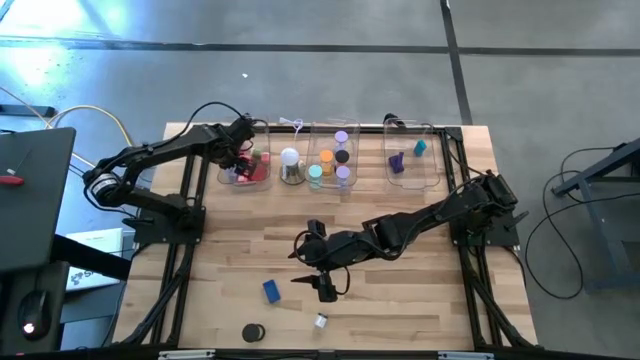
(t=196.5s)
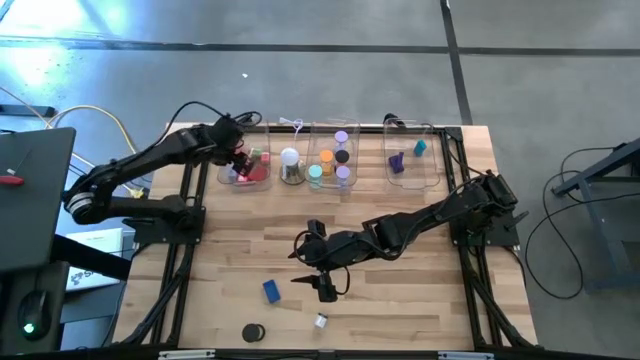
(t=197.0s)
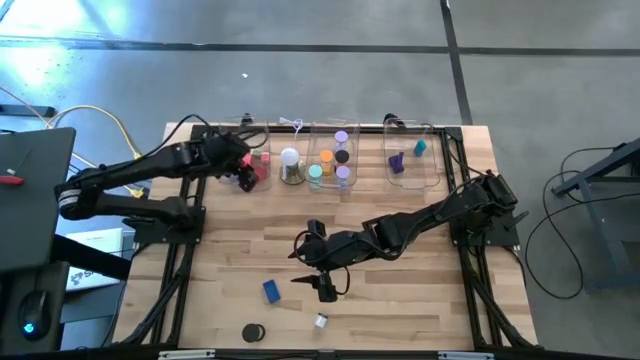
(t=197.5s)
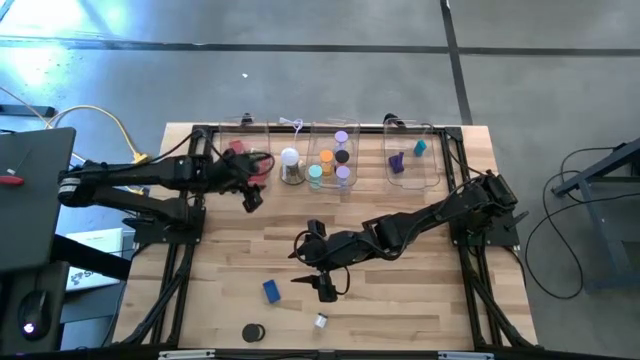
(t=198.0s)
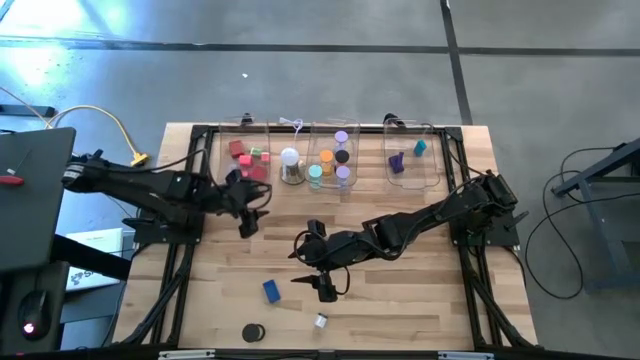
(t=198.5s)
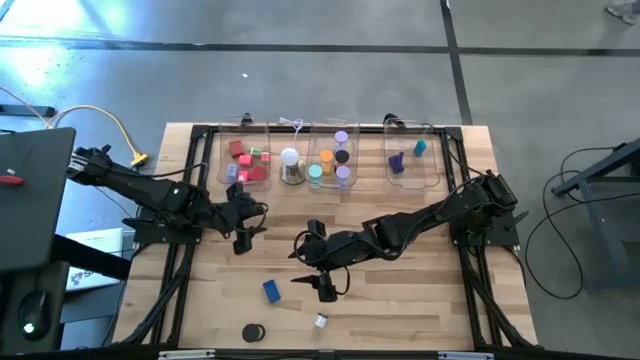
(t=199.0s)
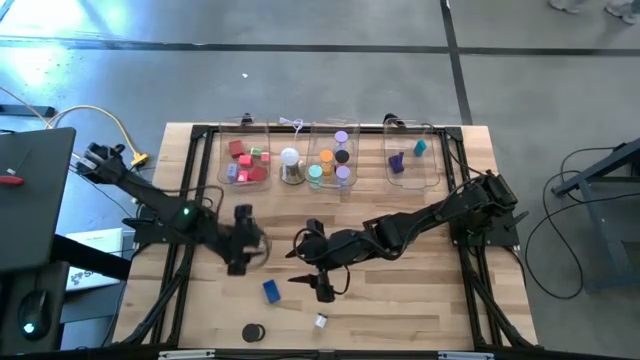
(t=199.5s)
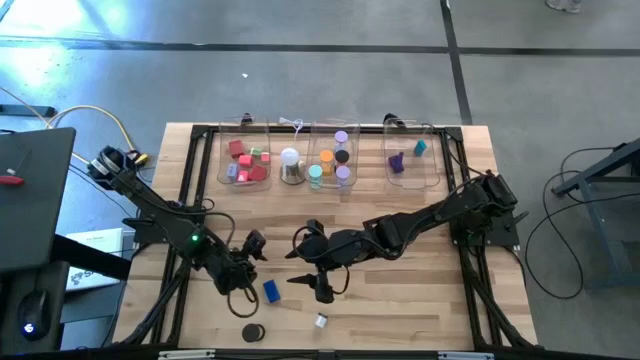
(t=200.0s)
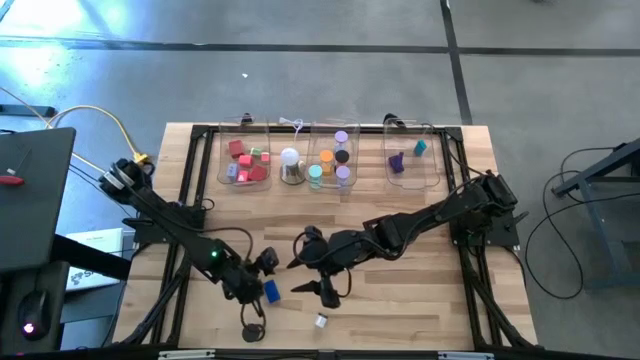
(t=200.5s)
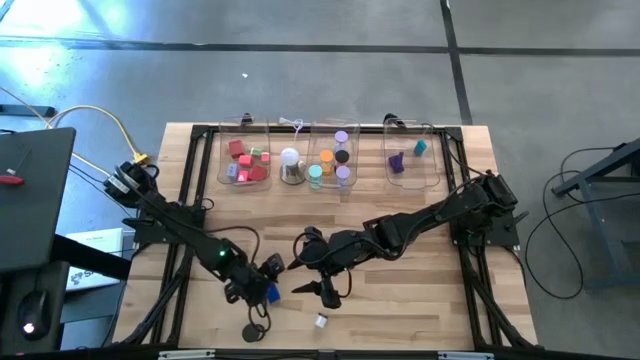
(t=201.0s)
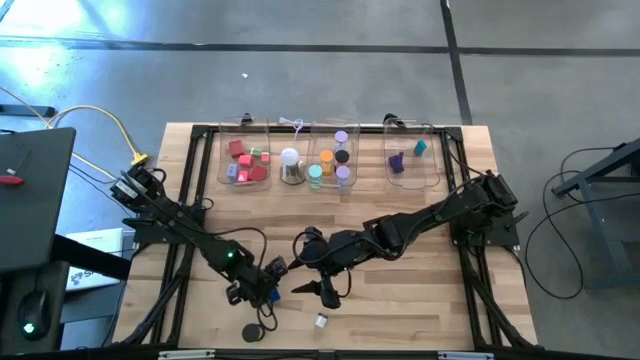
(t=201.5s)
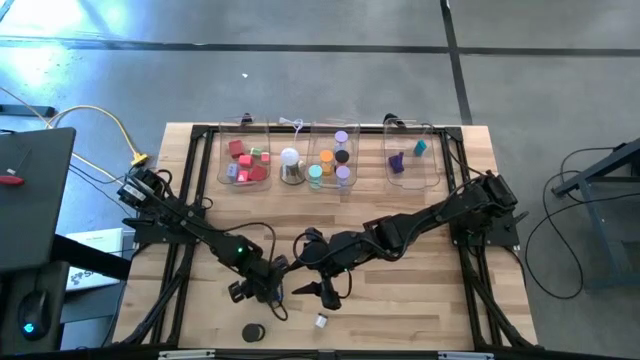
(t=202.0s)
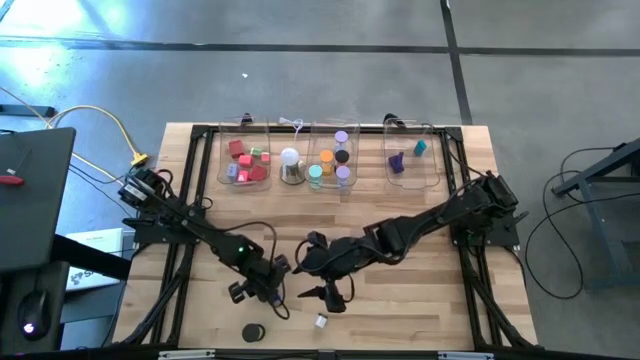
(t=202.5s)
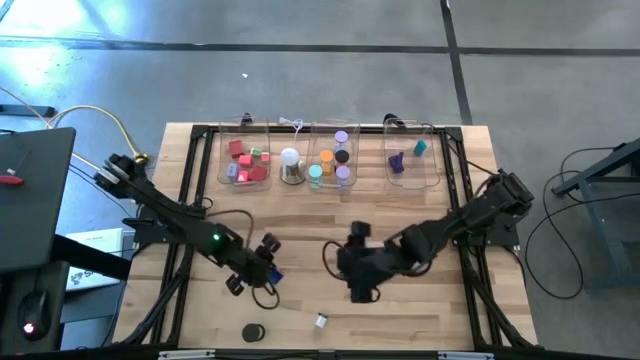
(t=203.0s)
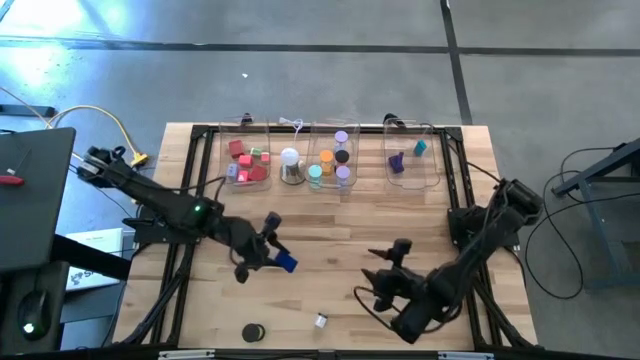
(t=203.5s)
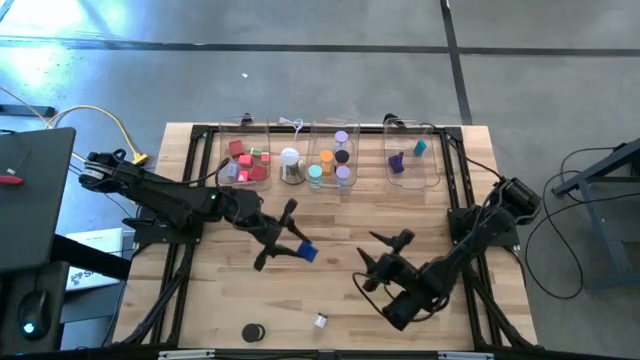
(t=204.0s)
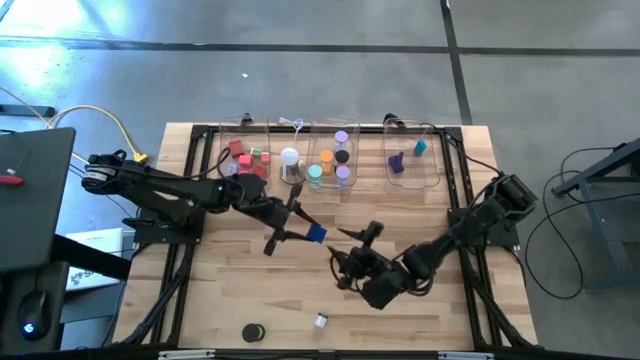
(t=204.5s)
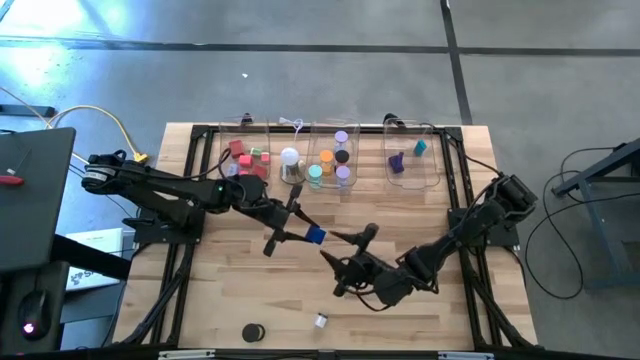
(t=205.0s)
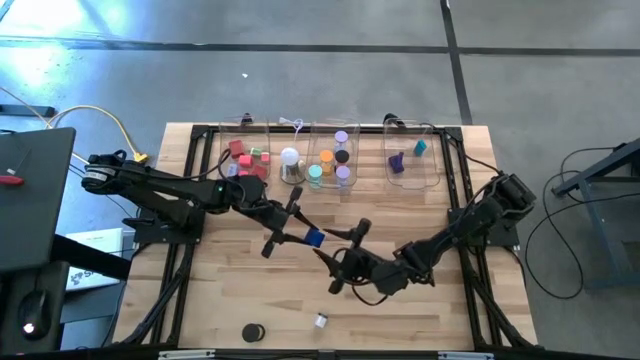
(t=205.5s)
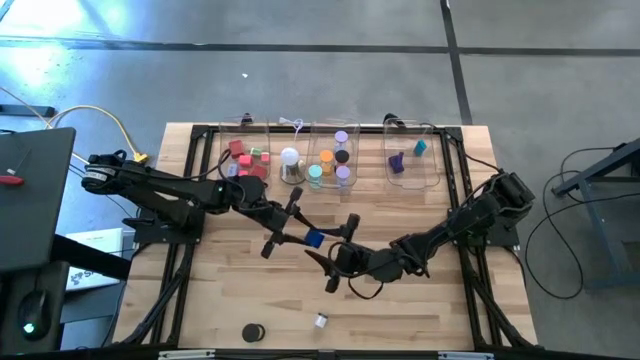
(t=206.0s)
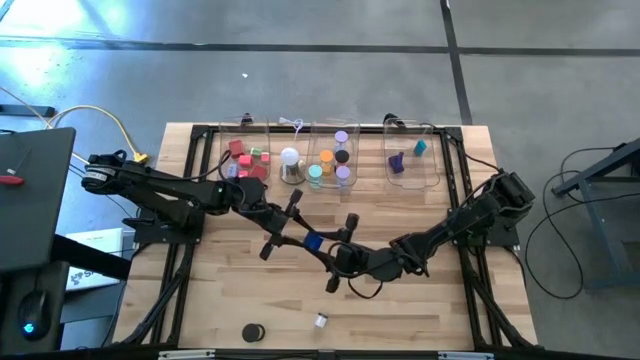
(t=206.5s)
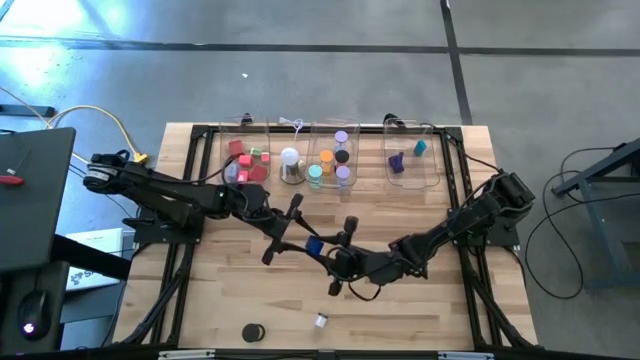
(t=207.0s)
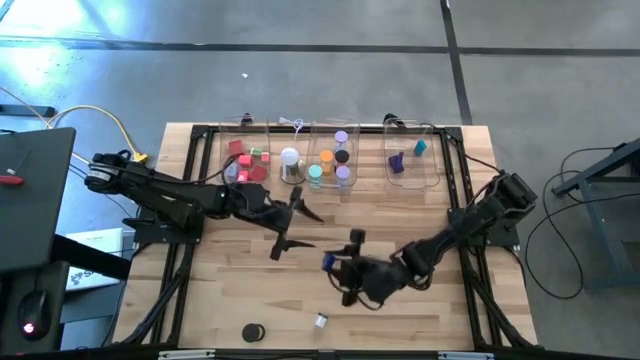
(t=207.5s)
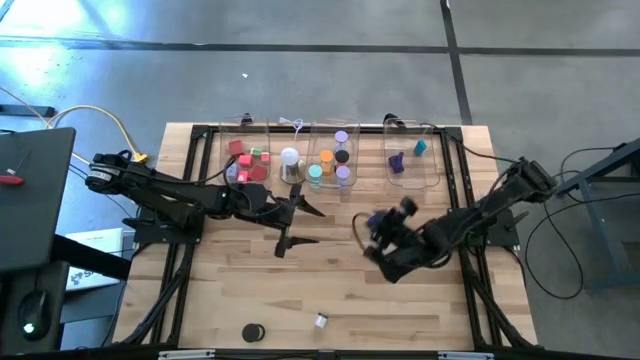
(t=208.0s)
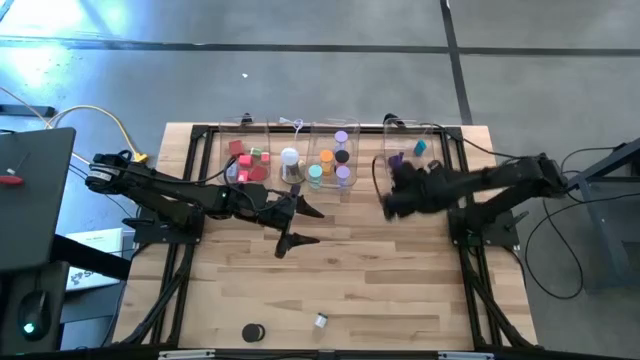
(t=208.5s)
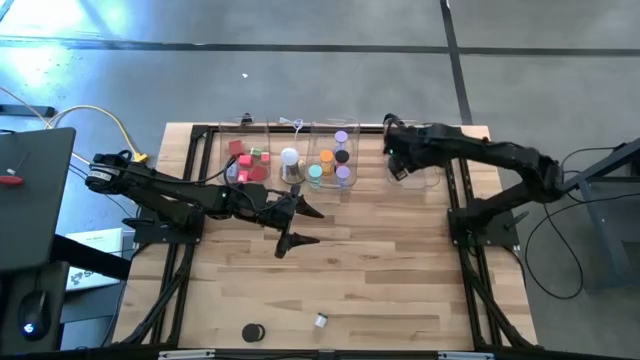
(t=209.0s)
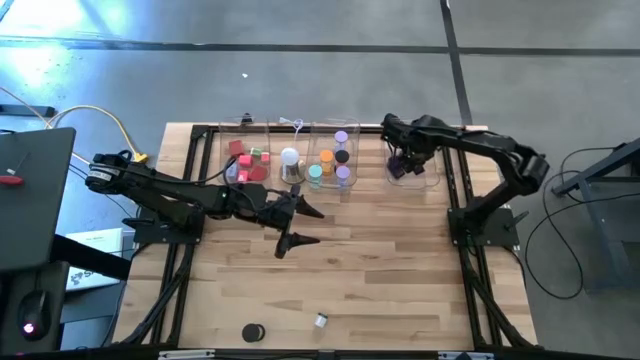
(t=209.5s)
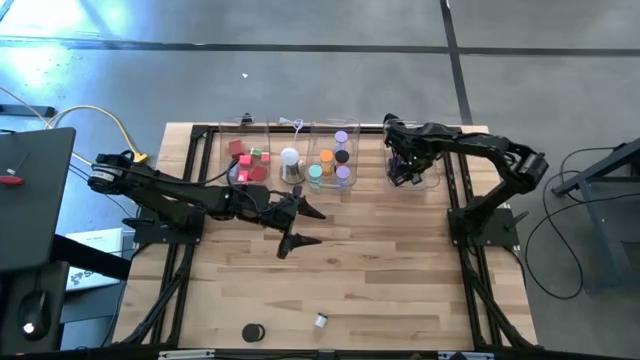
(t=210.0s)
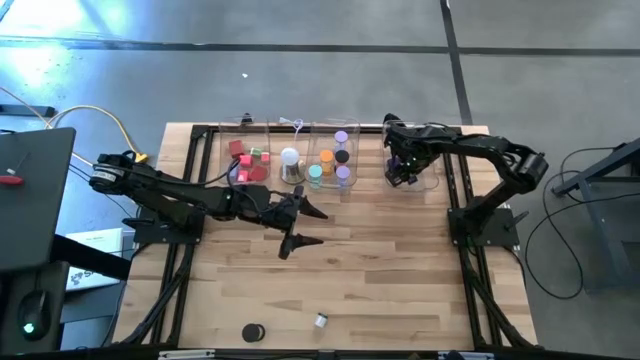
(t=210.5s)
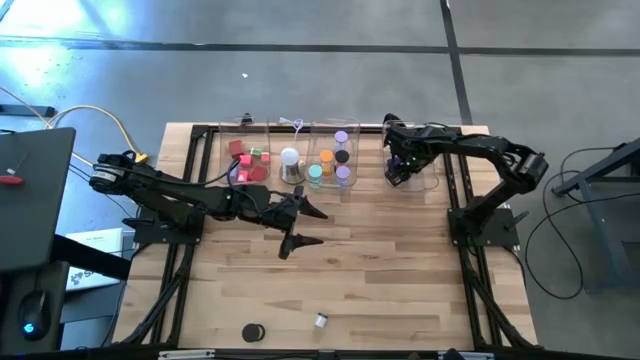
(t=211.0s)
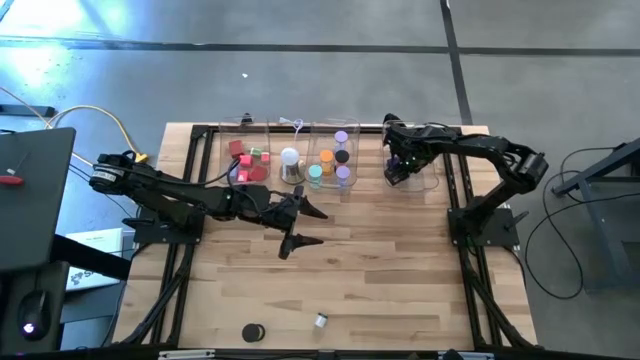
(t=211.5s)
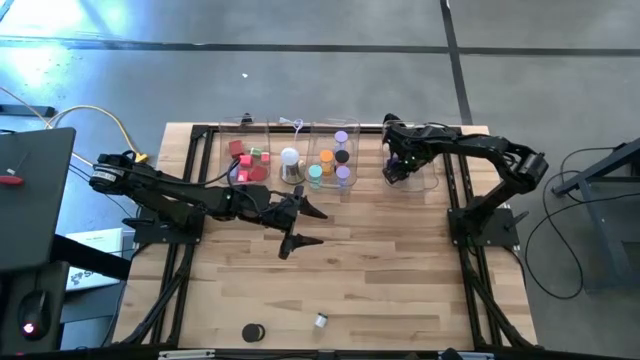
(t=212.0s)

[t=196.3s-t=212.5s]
Task: Pick & Place Office items
Put the blue digital clock into the right transparent bin

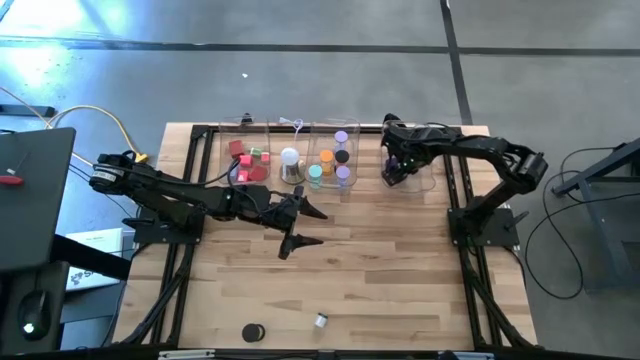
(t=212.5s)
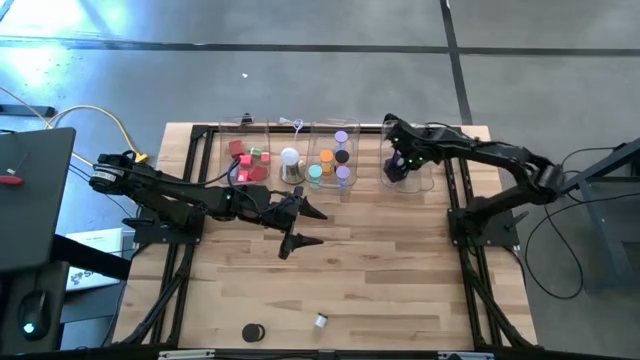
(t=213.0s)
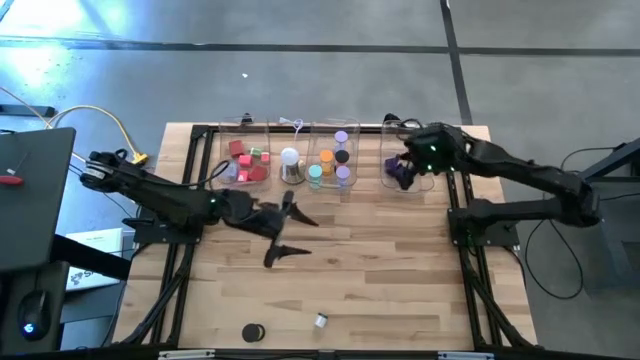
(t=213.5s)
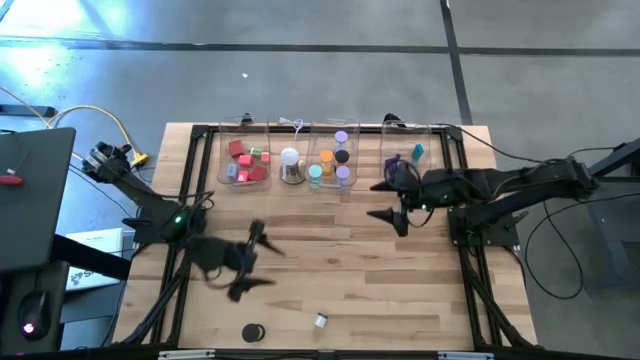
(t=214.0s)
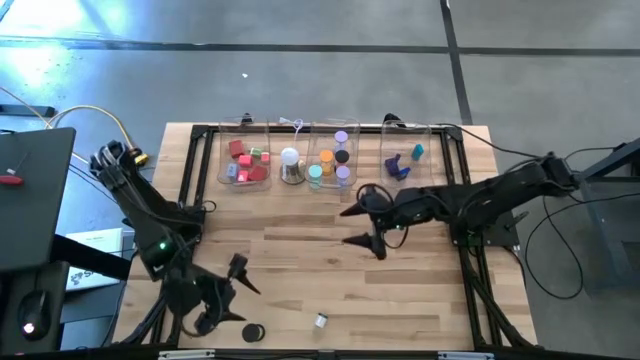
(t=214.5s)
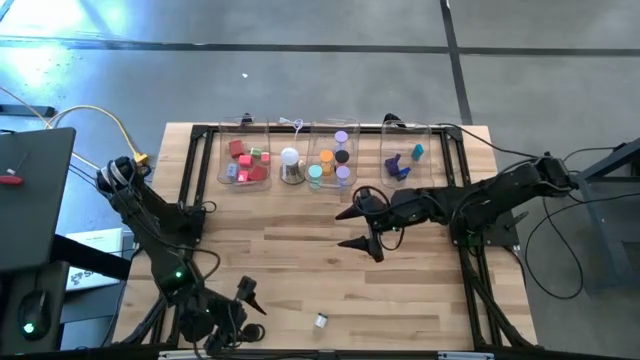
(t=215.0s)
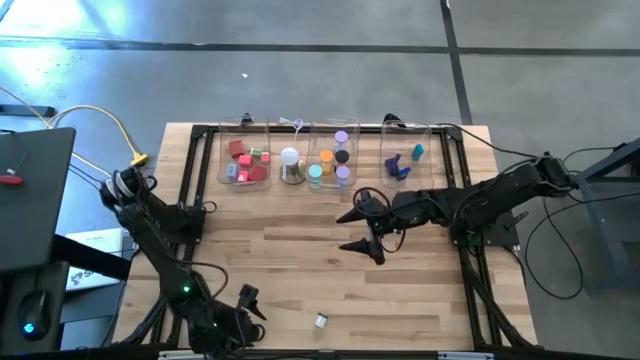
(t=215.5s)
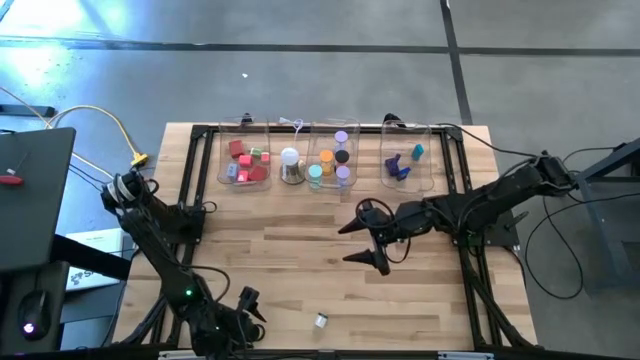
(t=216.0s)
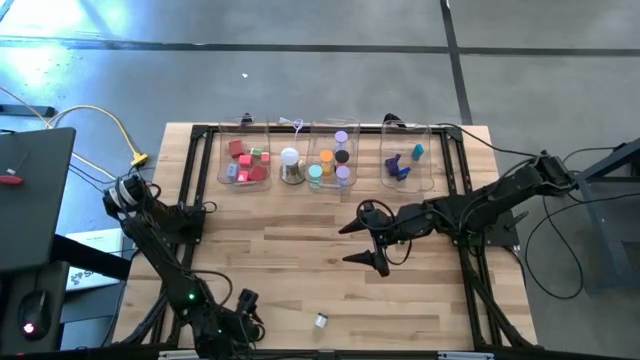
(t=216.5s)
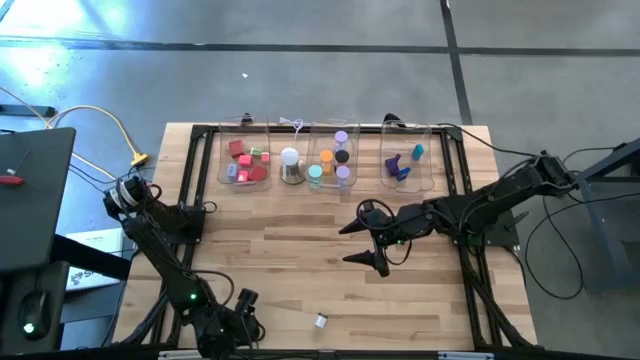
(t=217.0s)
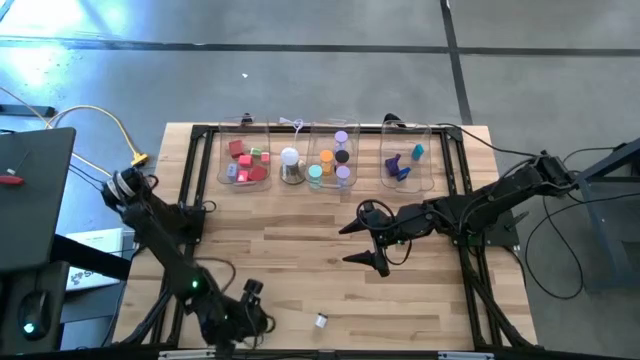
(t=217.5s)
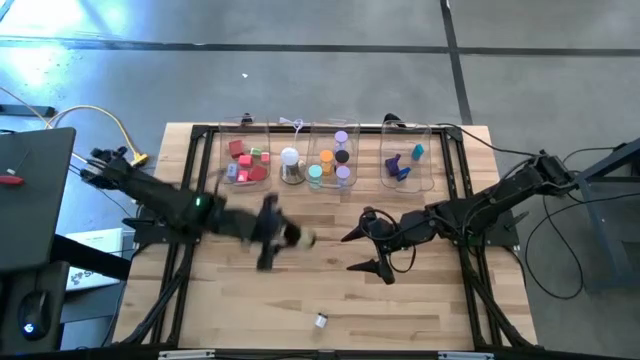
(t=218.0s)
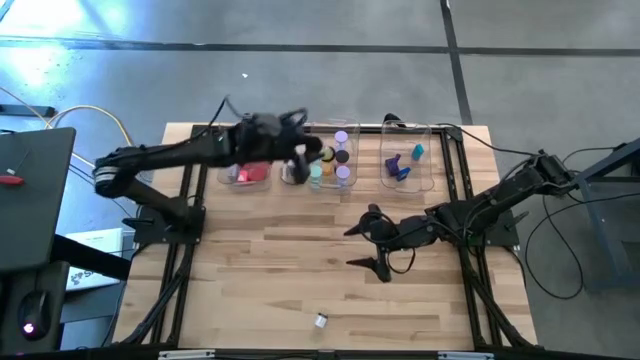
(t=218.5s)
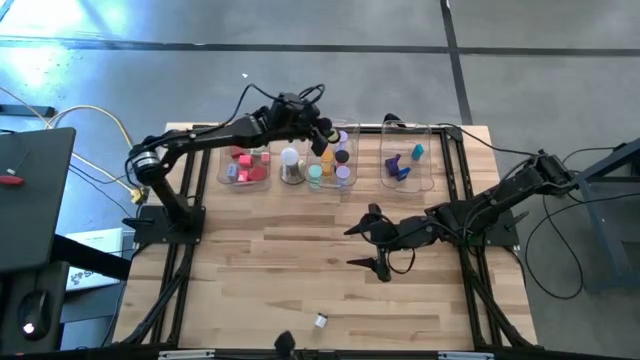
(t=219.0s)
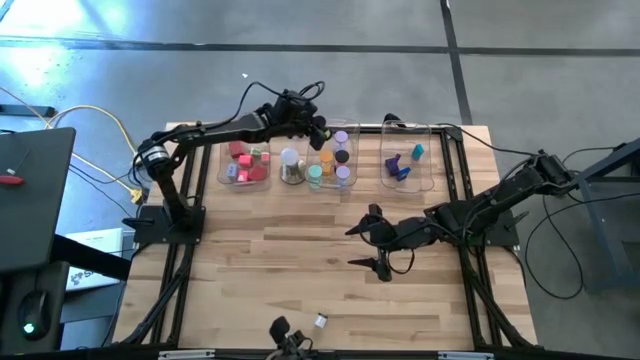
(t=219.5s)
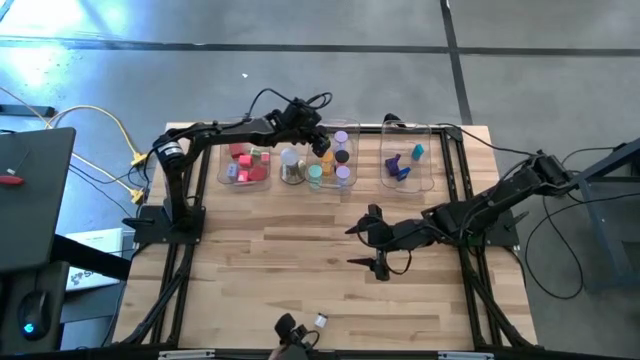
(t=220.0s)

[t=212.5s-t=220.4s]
Put the black hourglass into the middle transparent bin
